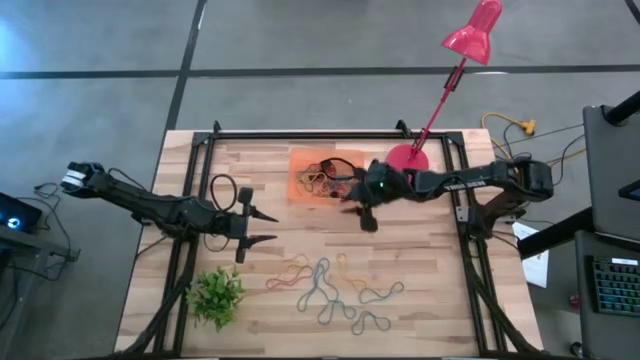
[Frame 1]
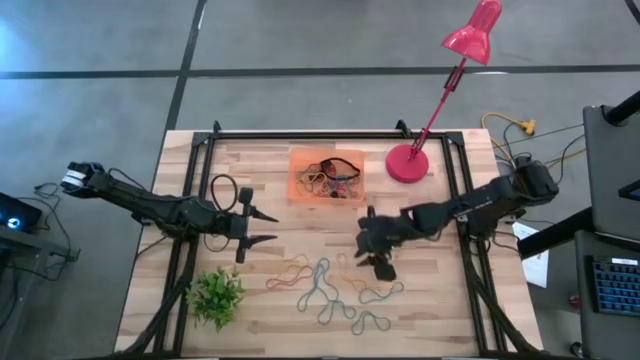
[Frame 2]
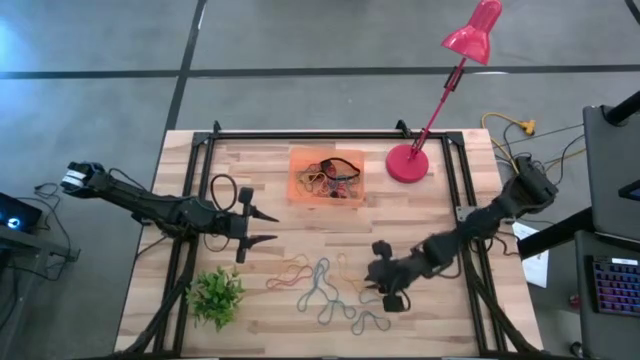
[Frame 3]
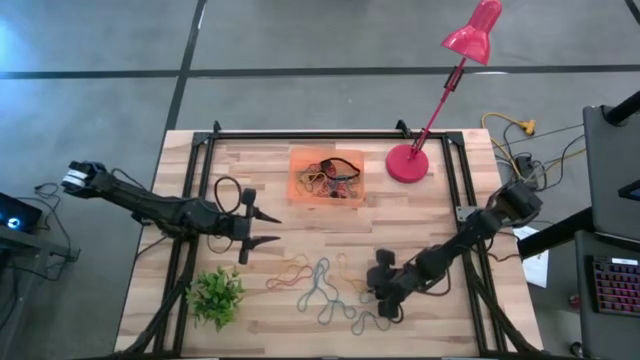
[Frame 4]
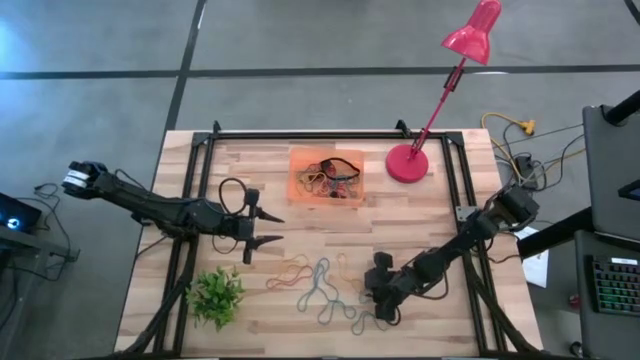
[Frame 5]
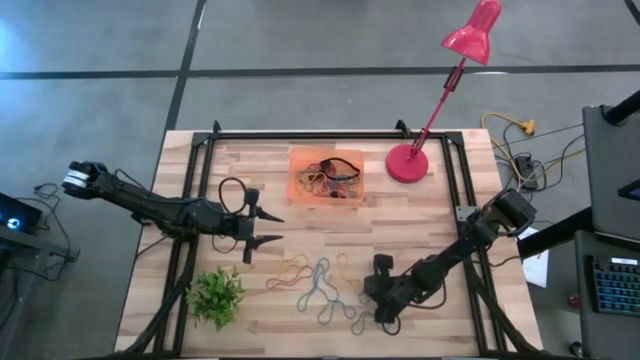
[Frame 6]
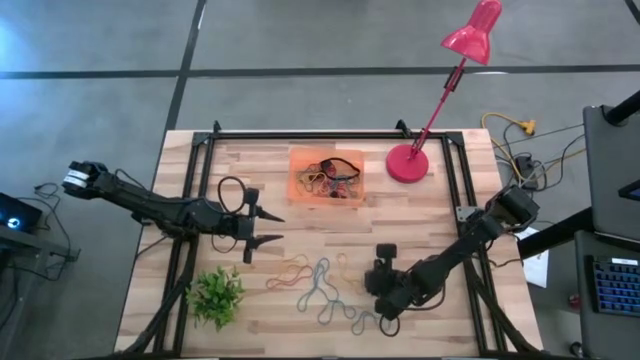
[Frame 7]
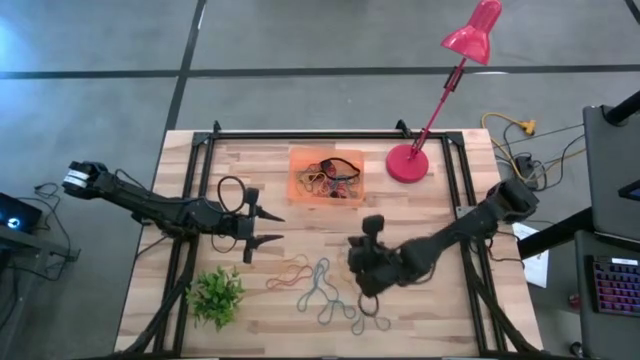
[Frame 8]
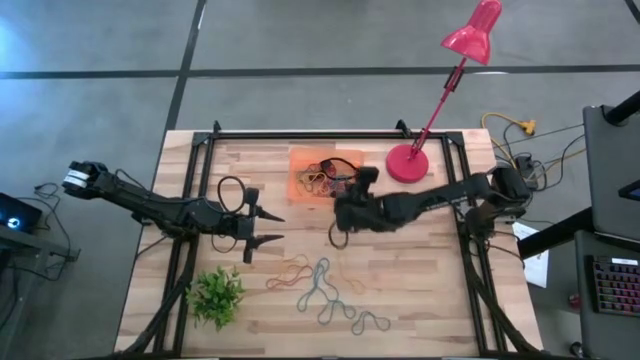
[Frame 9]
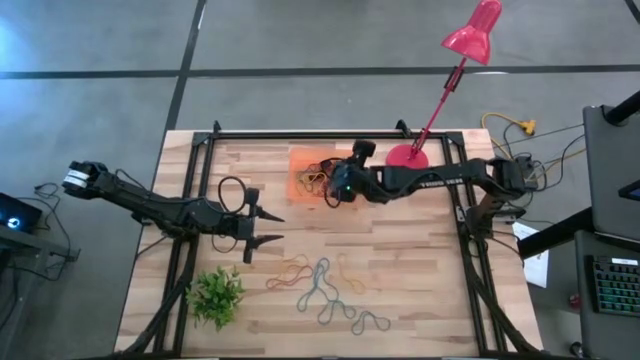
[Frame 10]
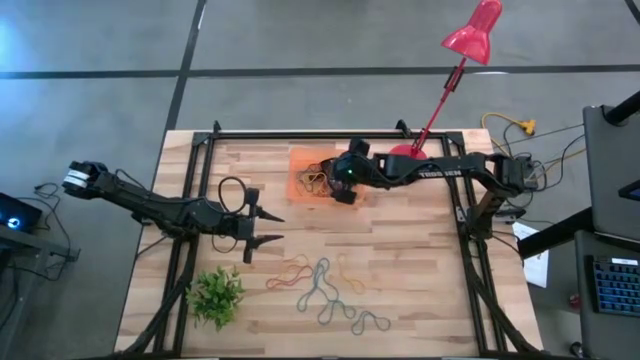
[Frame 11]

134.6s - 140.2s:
Task: Pick and place rubber bands into bin
Put the blue rubber band into the orange bin

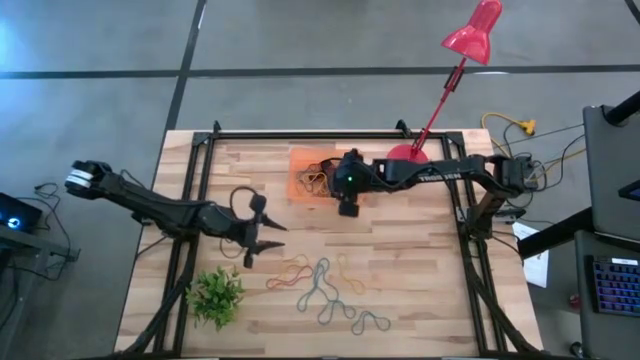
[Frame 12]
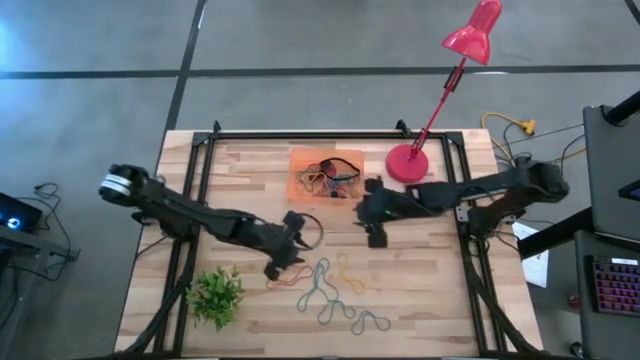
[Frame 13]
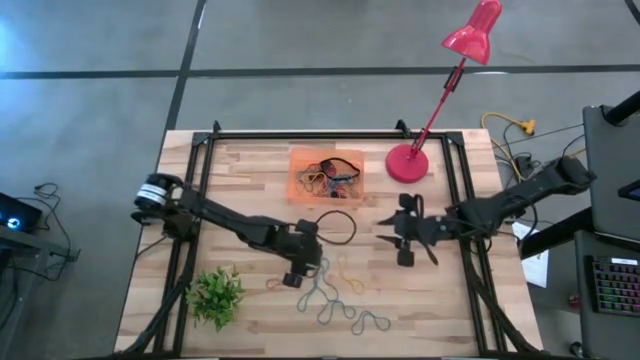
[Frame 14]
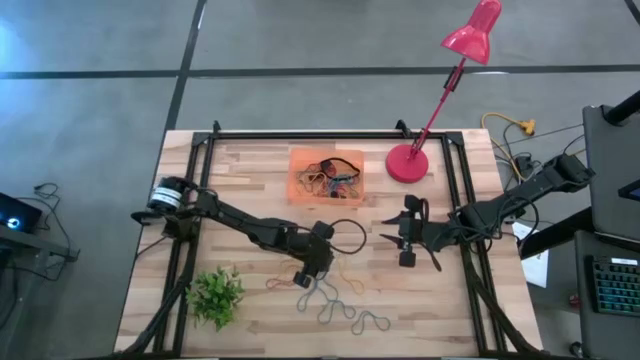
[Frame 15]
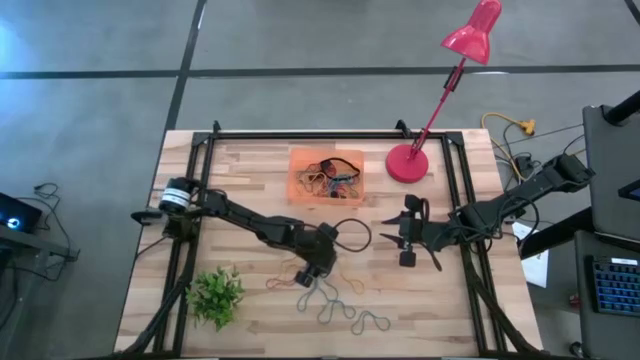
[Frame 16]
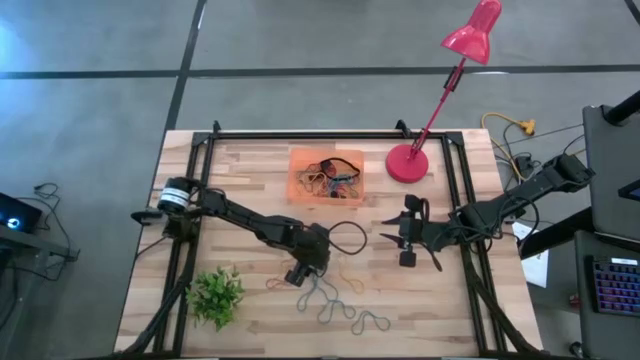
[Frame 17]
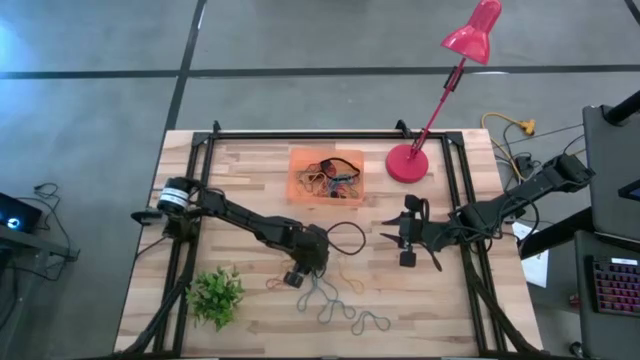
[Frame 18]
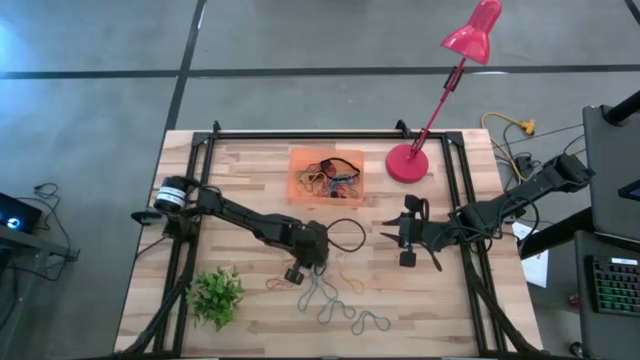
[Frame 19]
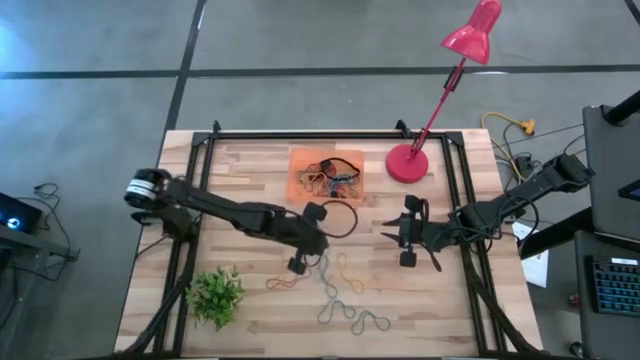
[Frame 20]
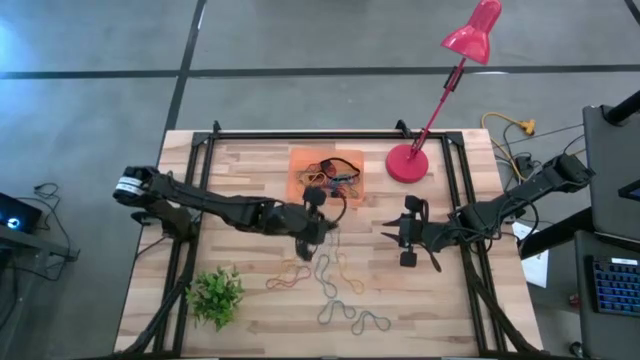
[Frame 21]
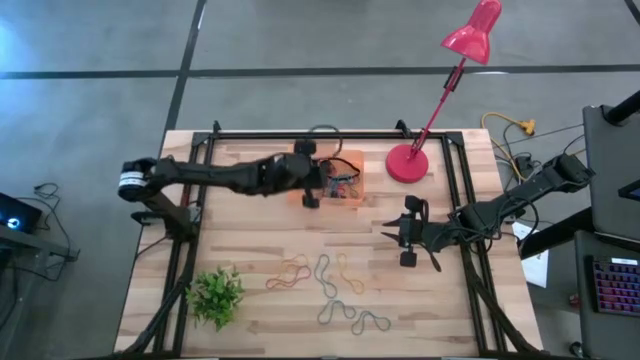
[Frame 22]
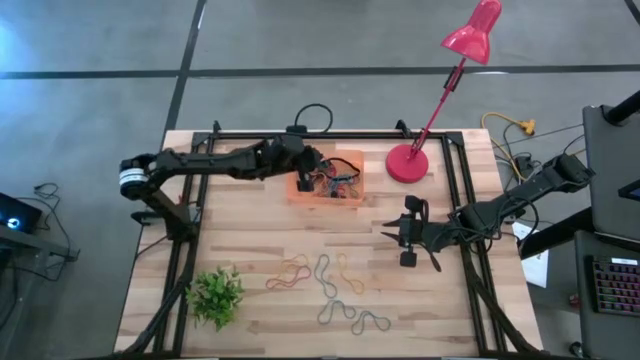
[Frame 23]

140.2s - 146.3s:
Put the blue rubber band into the orange bin

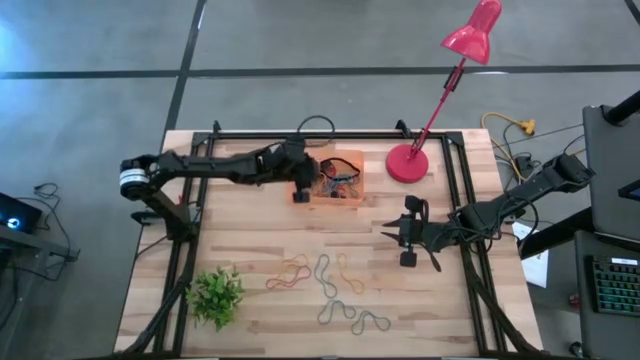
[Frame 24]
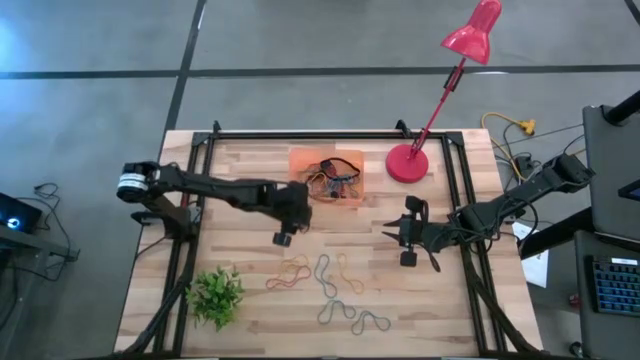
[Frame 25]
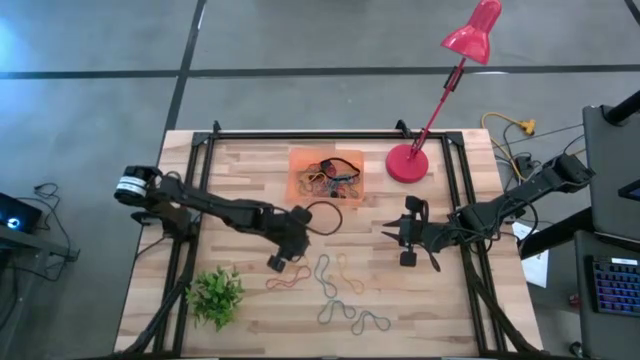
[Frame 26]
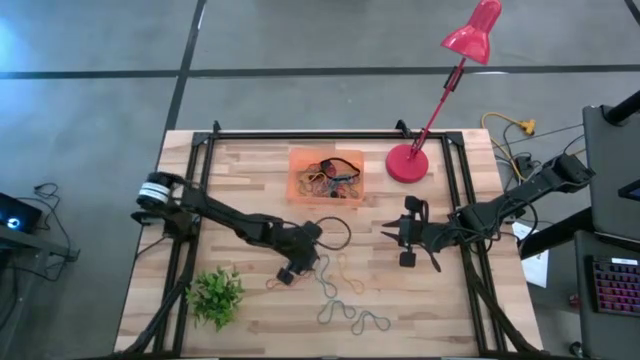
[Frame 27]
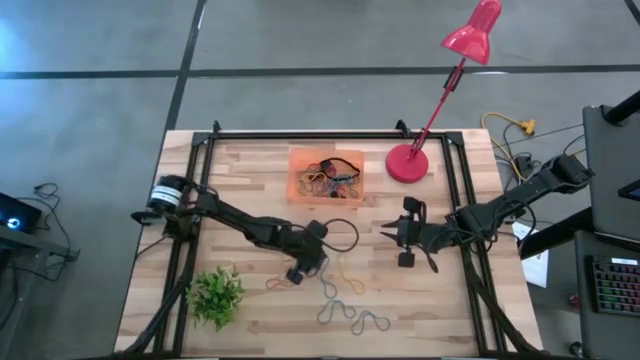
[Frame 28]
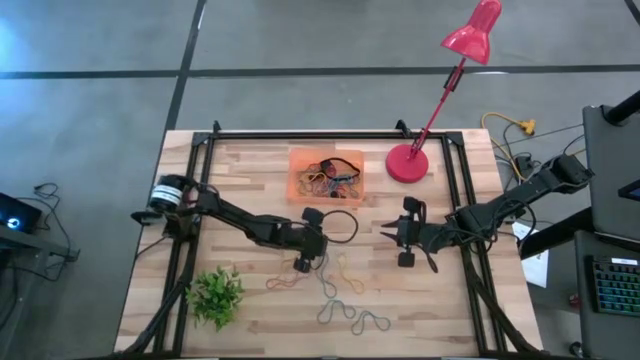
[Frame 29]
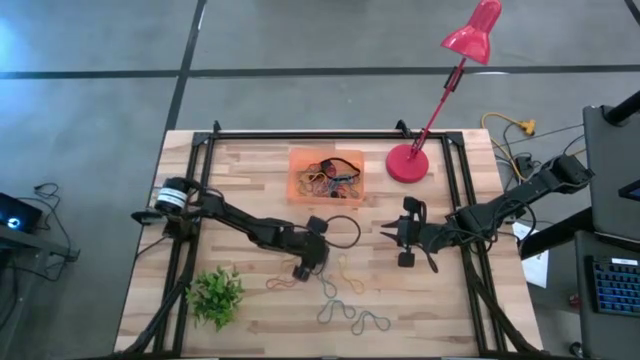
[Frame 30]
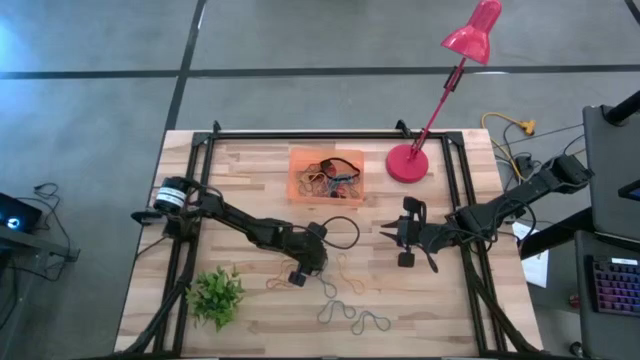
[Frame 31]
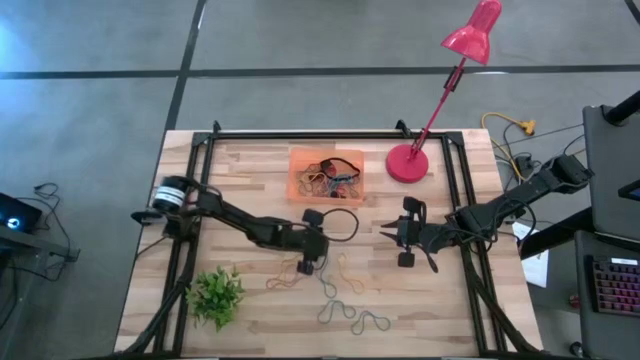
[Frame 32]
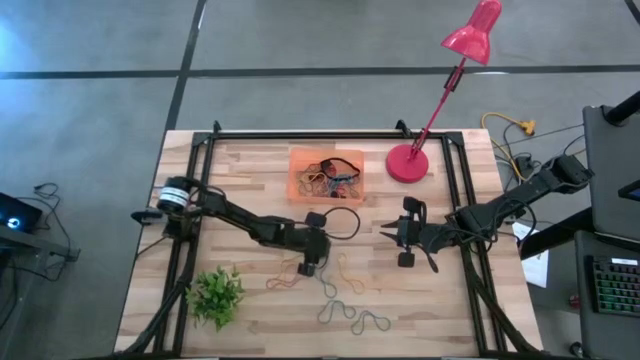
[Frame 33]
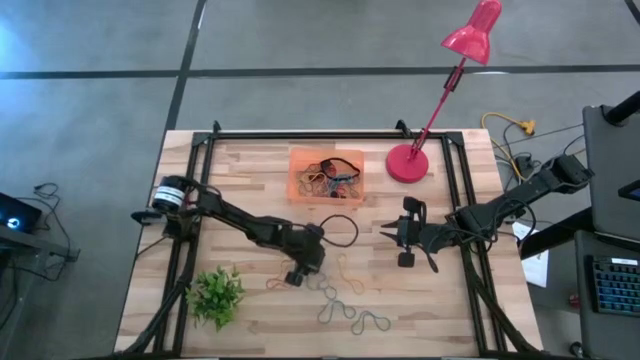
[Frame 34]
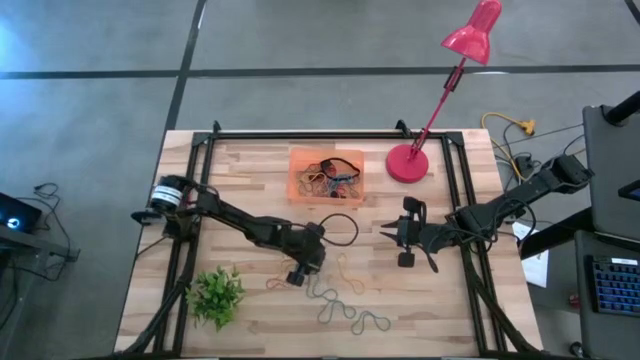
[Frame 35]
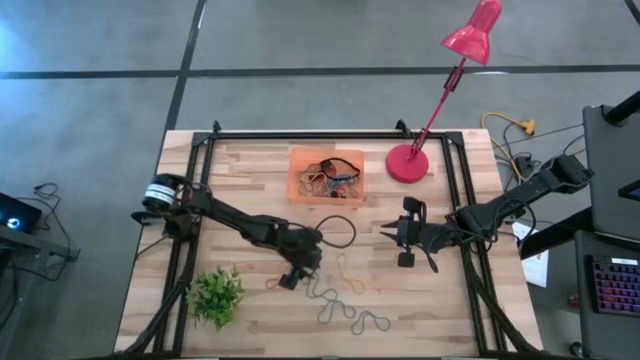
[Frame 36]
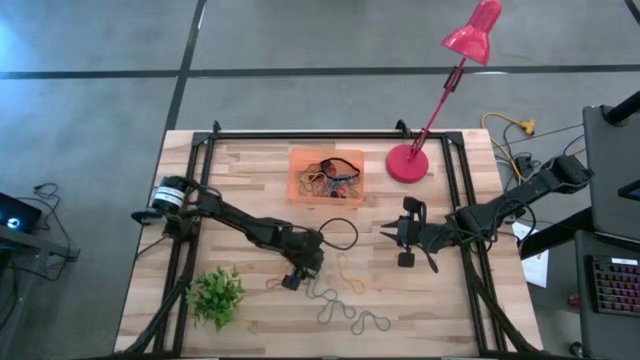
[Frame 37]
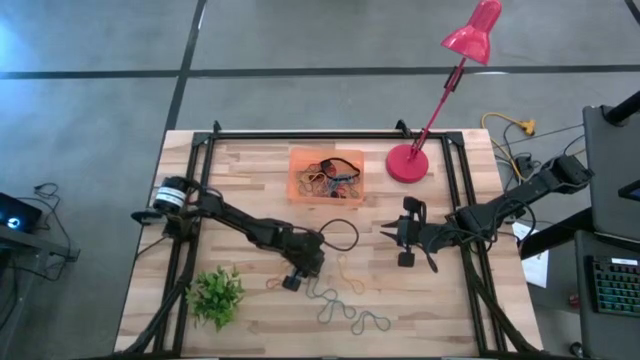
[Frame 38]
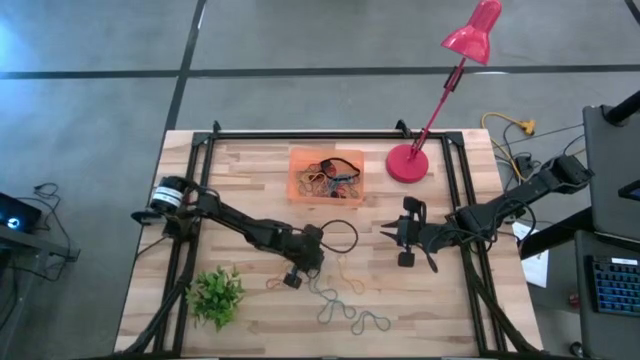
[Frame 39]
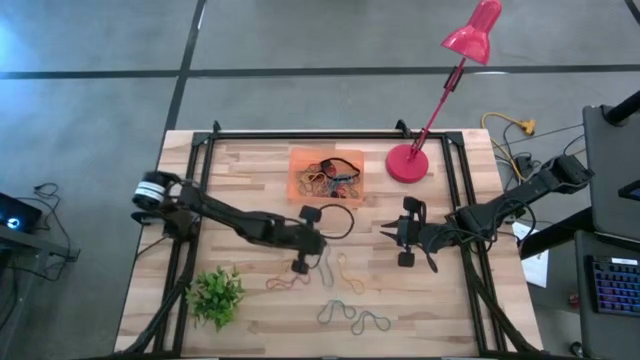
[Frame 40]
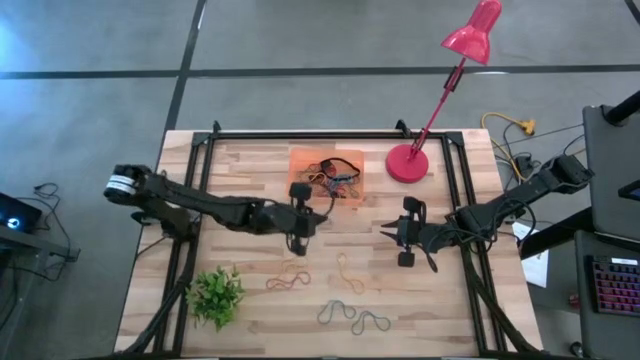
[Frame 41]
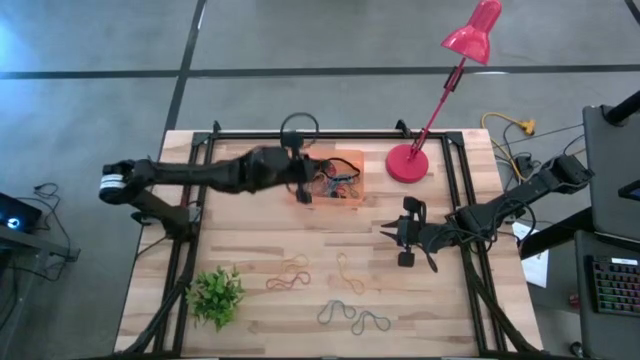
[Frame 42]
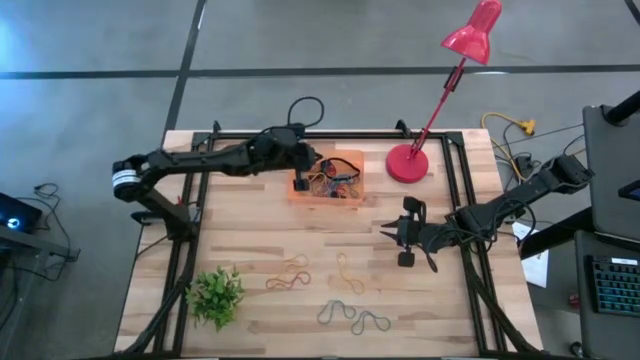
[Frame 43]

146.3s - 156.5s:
Put the blue rubber band into the orange bin
